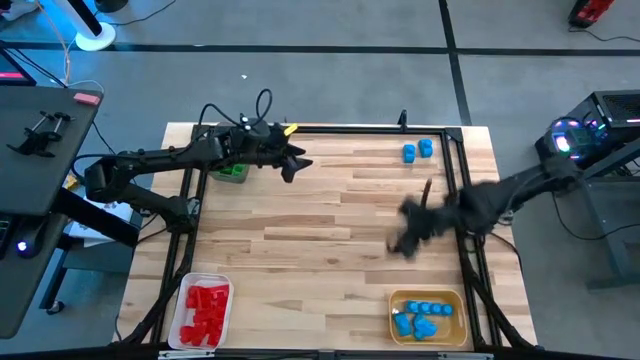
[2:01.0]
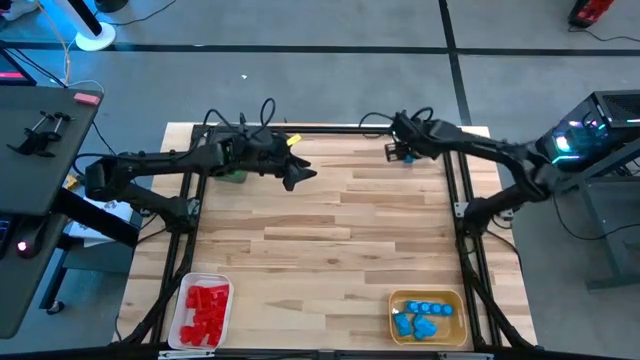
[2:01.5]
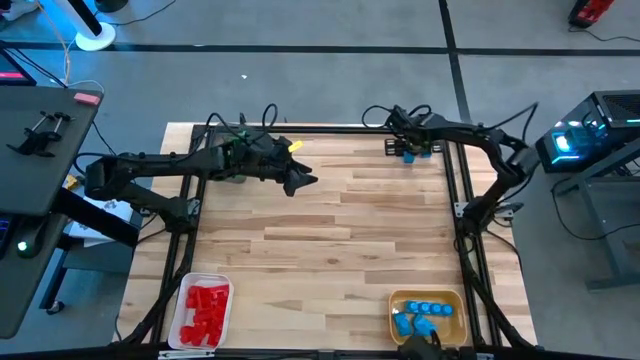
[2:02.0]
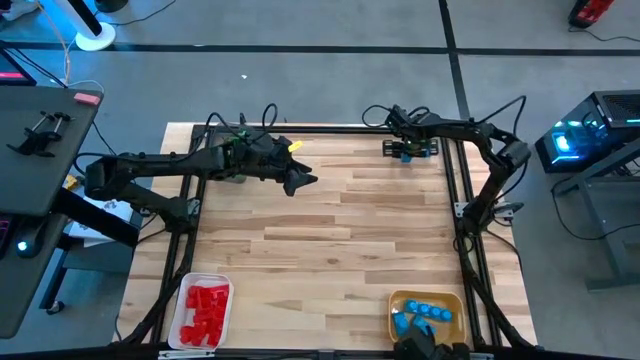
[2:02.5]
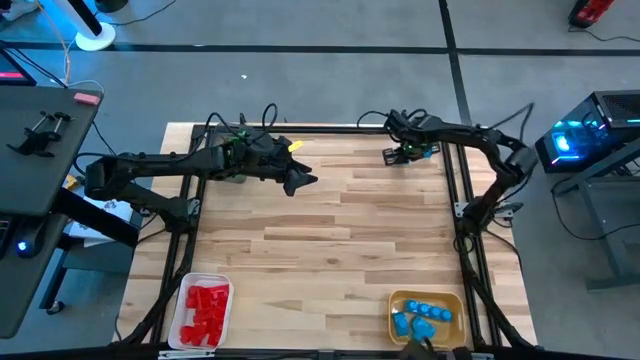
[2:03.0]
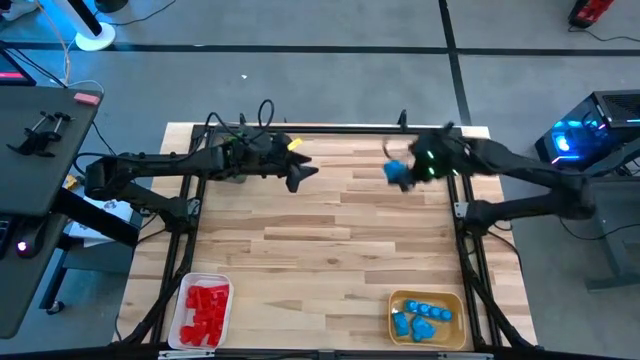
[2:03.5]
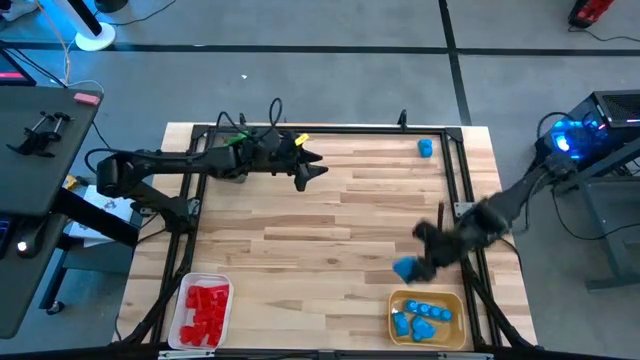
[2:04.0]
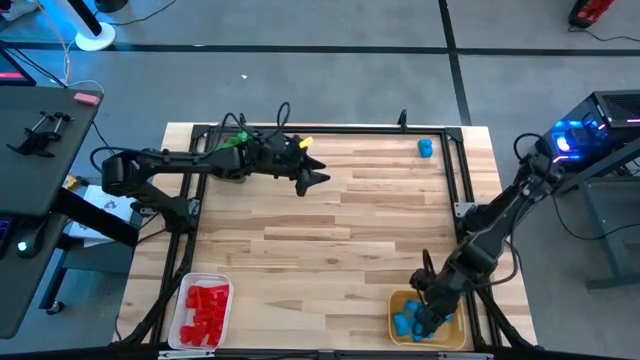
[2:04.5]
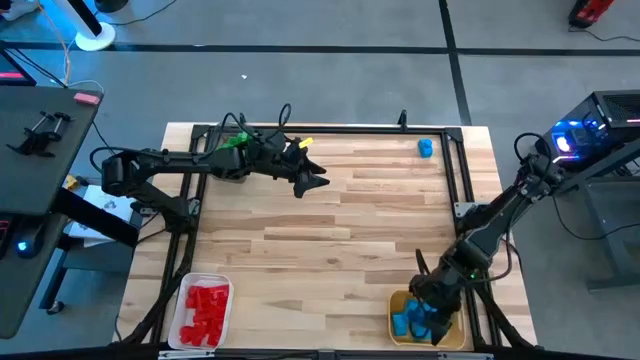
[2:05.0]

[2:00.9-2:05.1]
Task: Sort blocks
Put the blue game piece into the yellow bin

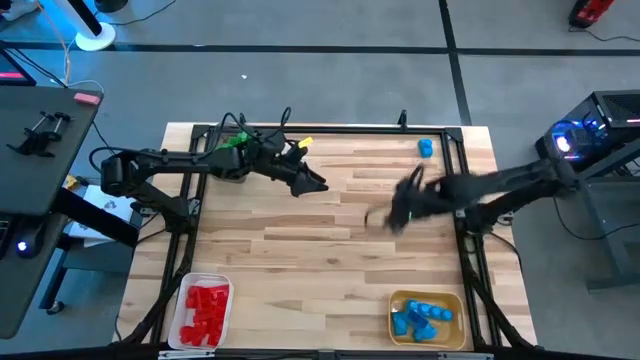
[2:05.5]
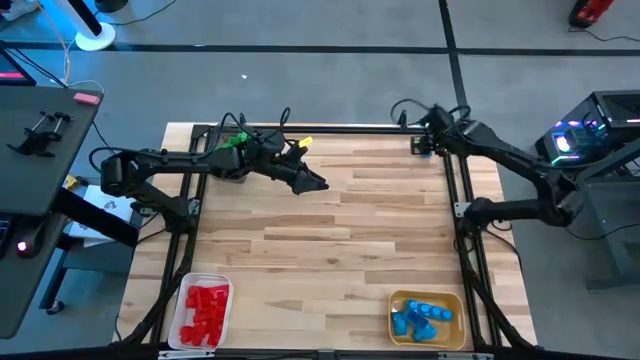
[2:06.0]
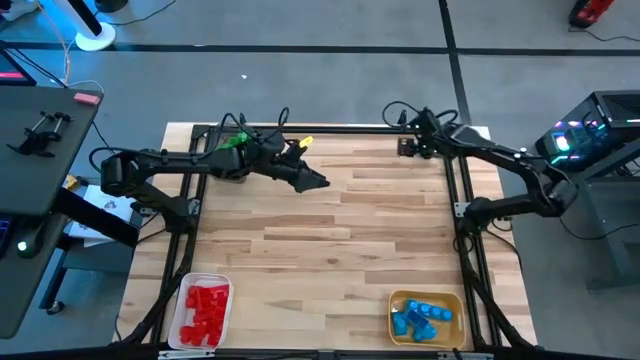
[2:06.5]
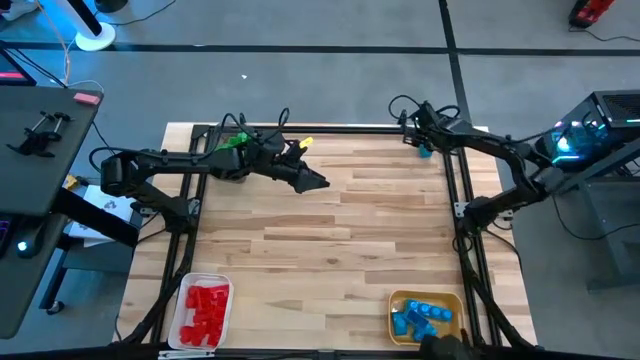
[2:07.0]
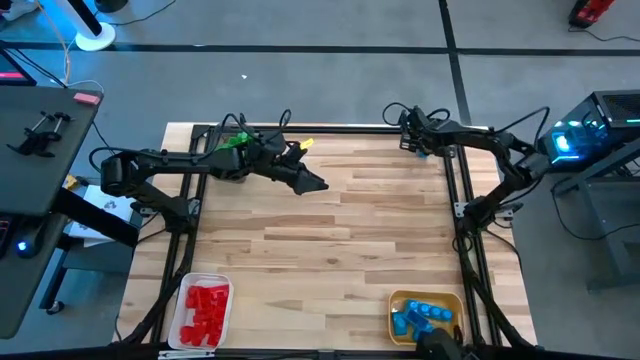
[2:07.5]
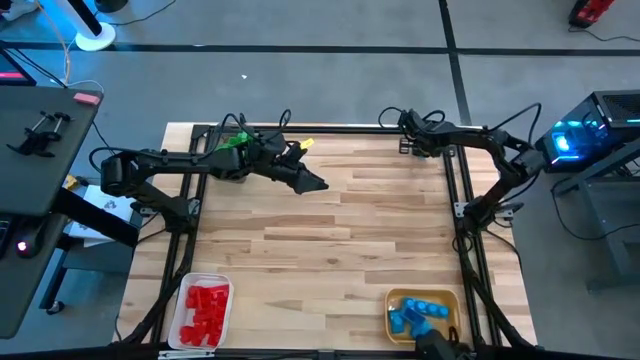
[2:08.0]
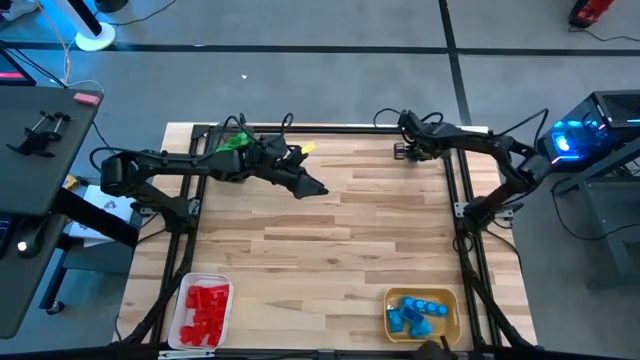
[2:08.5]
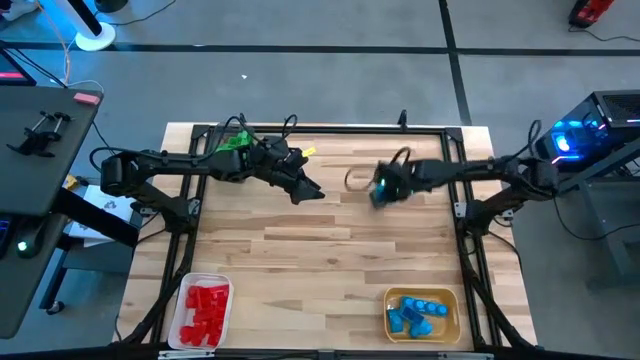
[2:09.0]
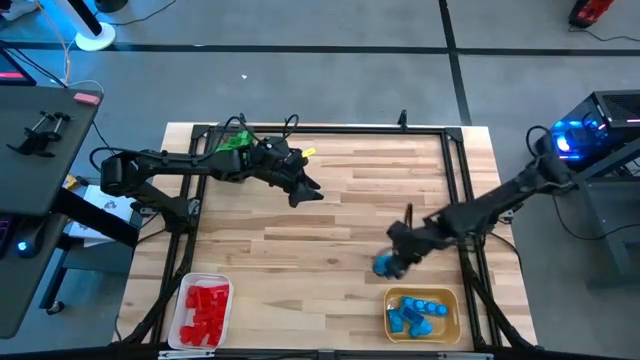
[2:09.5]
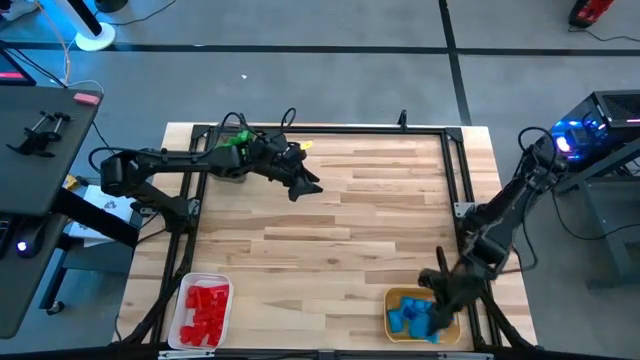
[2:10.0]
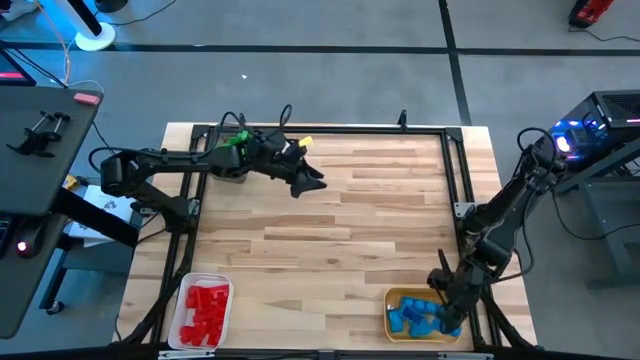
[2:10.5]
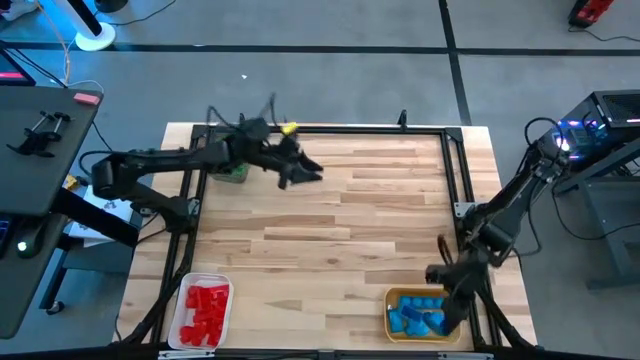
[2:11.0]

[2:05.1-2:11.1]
Put the blue game piece into the yellow bin

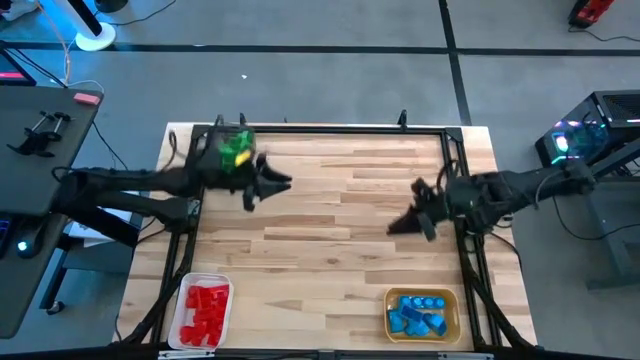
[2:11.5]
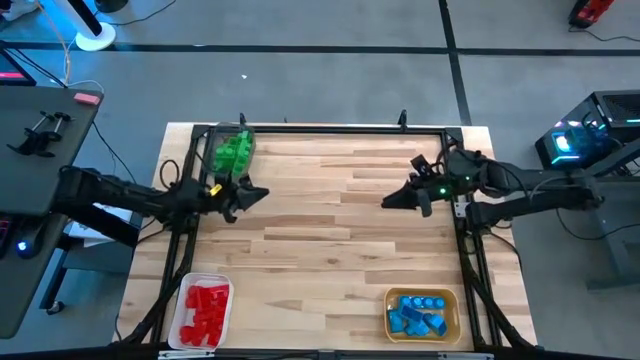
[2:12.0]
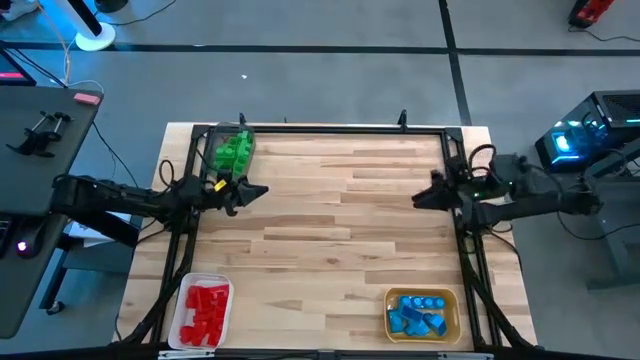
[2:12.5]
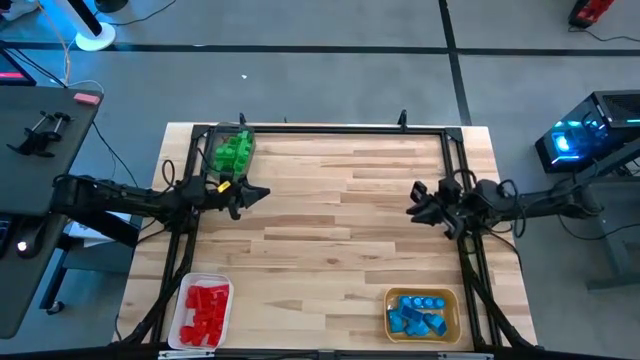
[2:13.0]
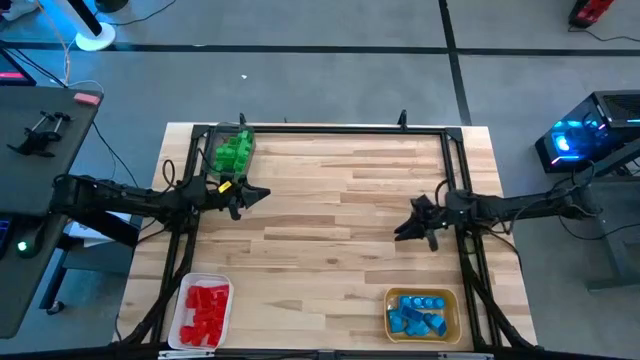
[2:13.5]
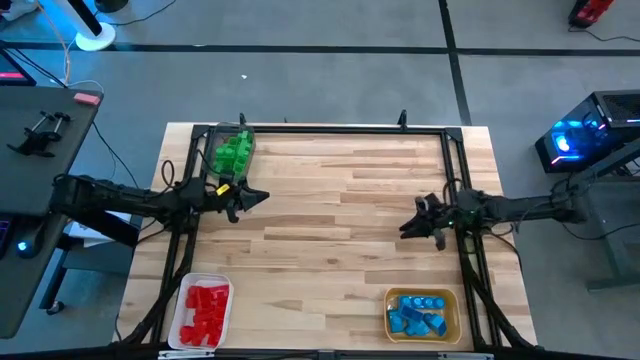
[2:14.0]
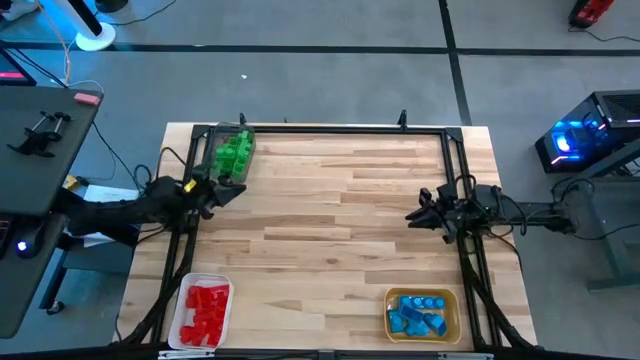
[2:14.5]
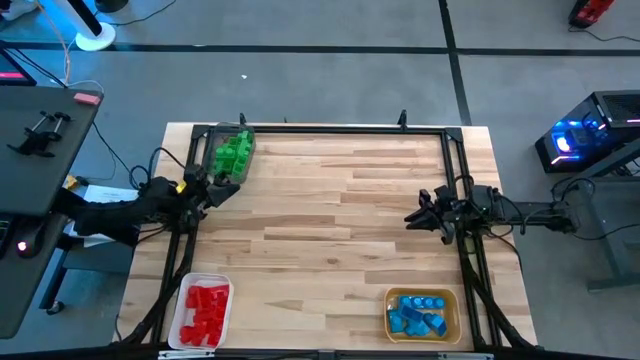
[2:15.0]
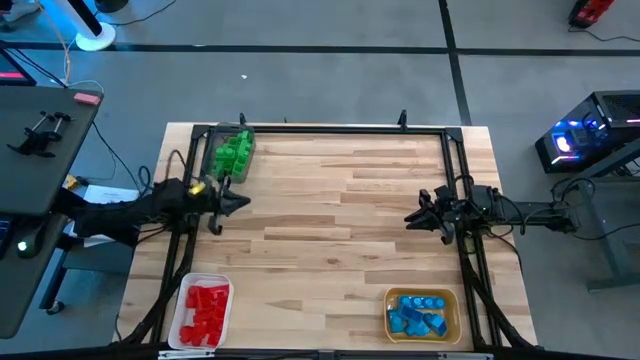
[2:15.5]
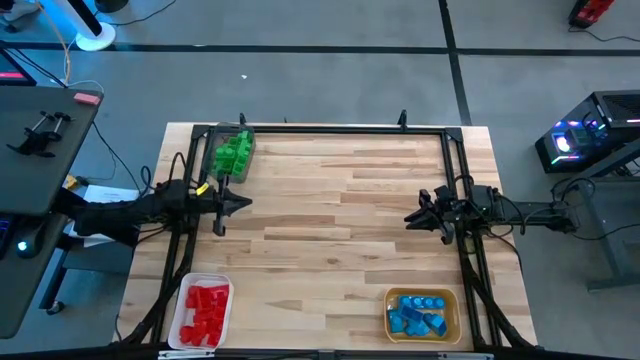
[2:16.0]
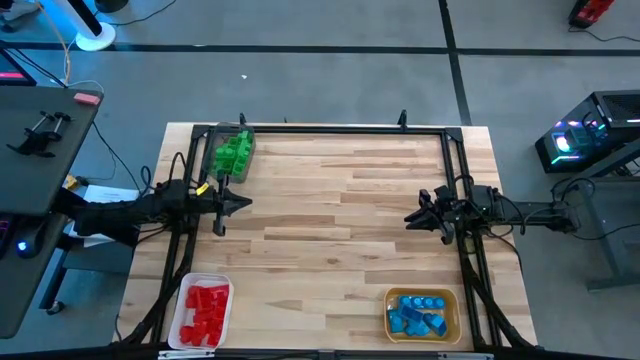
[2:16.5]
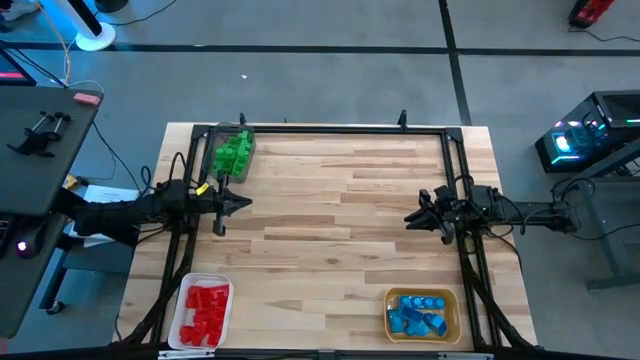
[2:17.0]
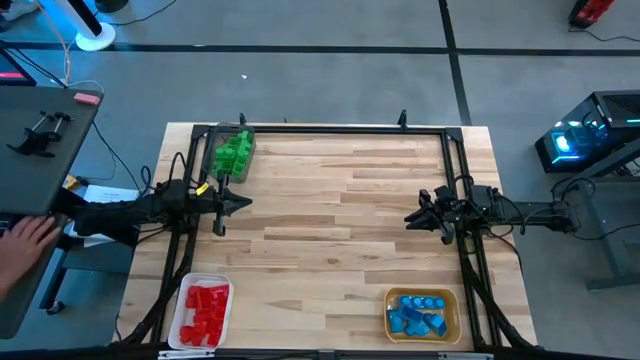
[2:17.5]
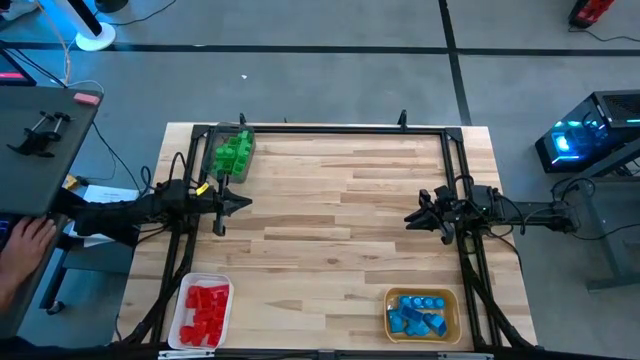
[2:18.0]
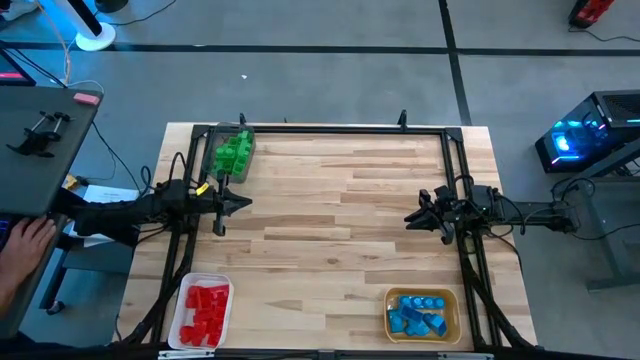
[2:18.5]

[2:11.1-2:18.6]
Return to Home Position

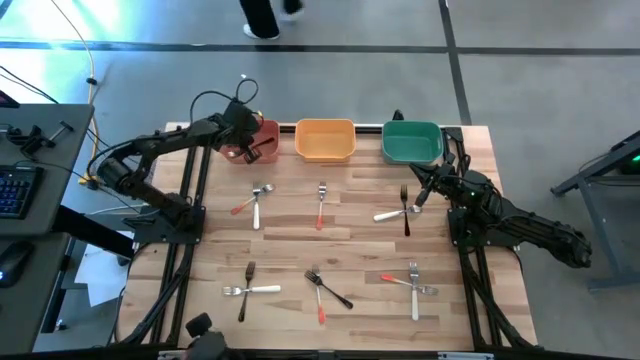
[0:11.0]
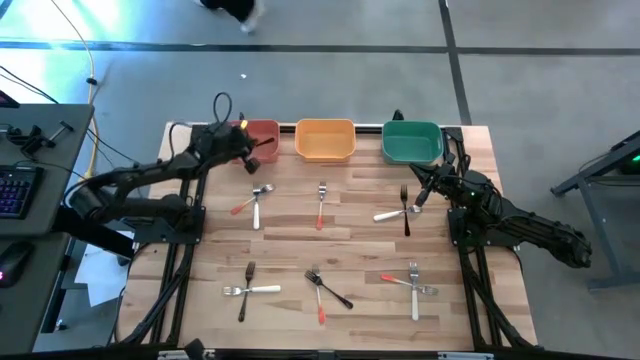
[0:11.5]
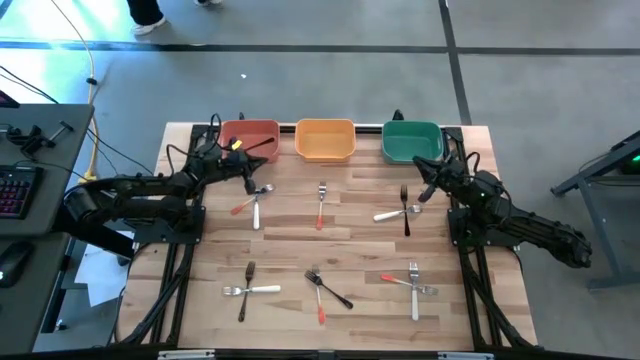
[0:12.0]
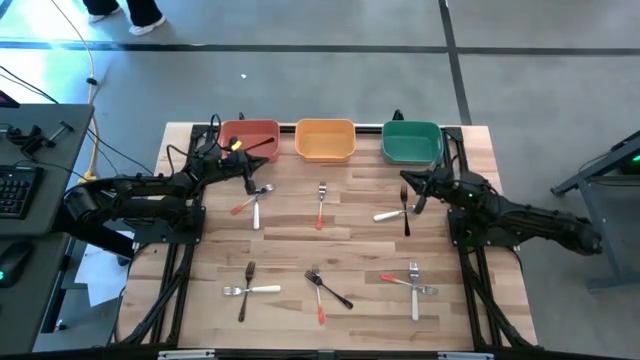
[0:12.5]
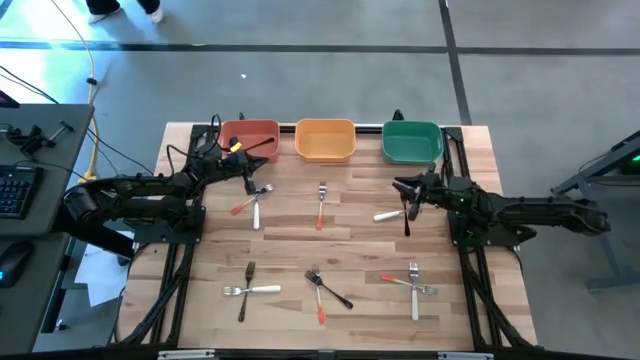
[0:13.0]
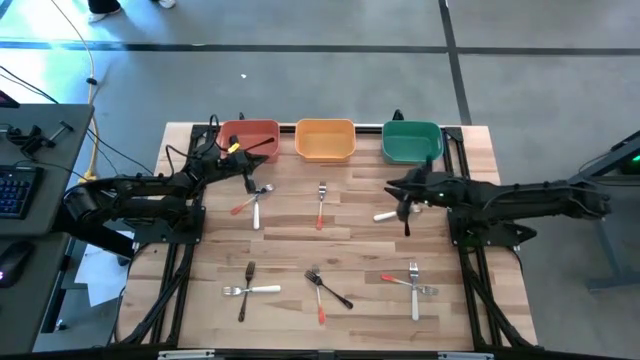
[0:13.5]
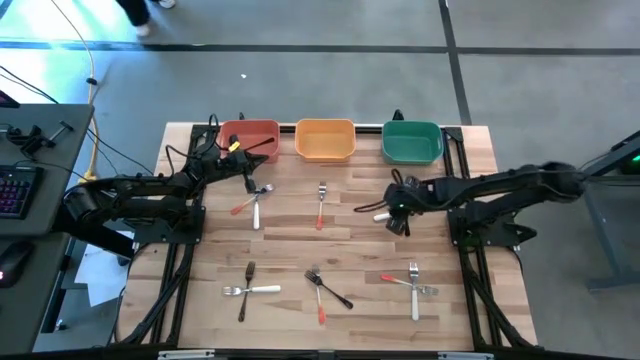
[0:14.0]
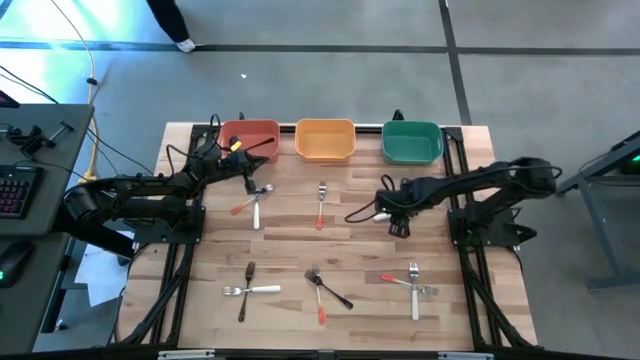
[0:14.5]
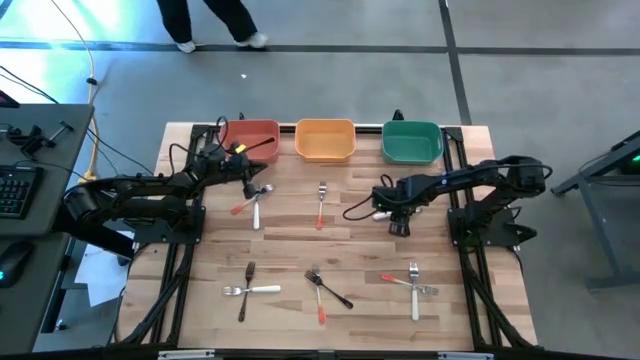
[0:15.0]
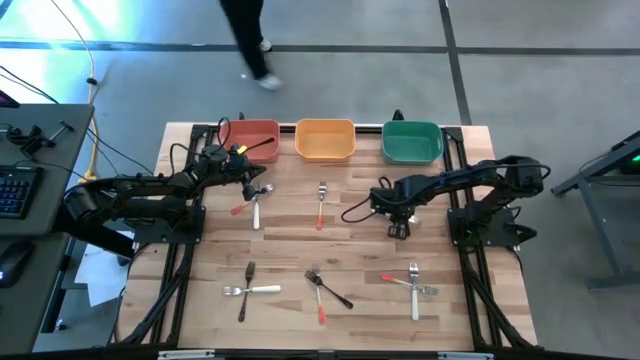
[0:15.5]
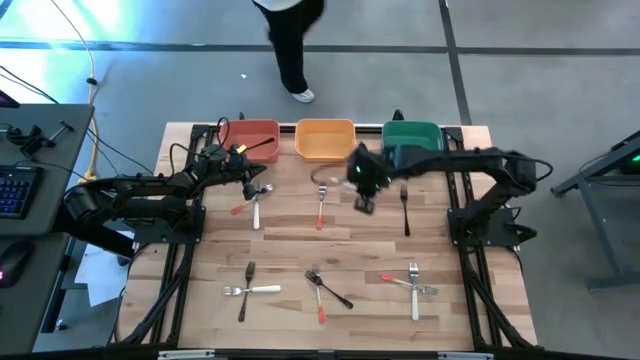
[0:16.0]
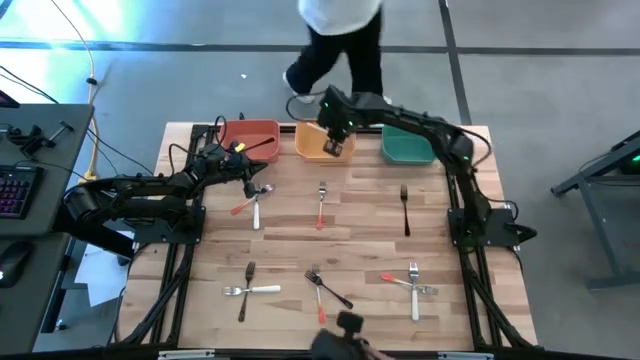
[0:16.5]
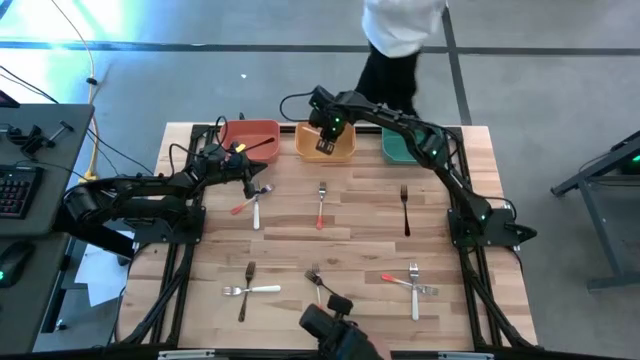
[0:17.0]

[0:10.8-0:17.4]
Task: Sort silverware by color (type)
Put the top right white fork into the yellow bin
